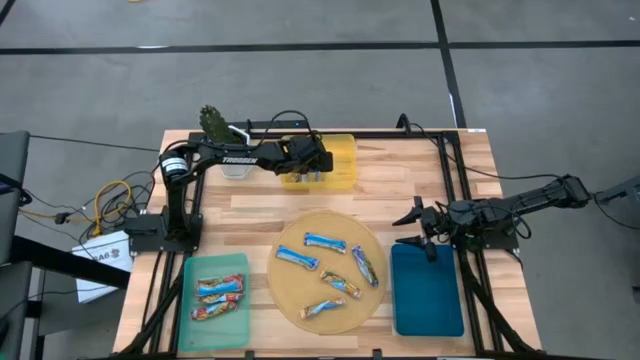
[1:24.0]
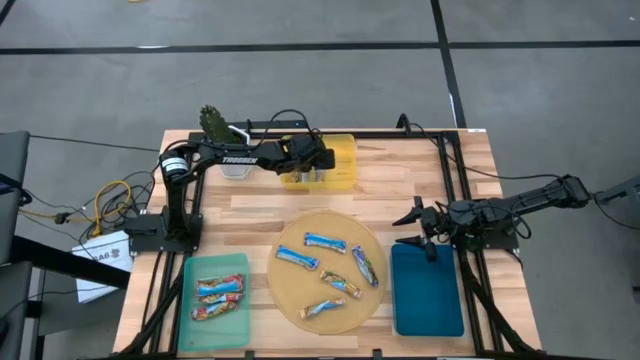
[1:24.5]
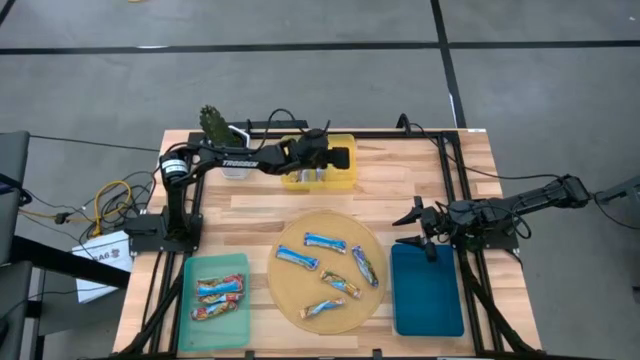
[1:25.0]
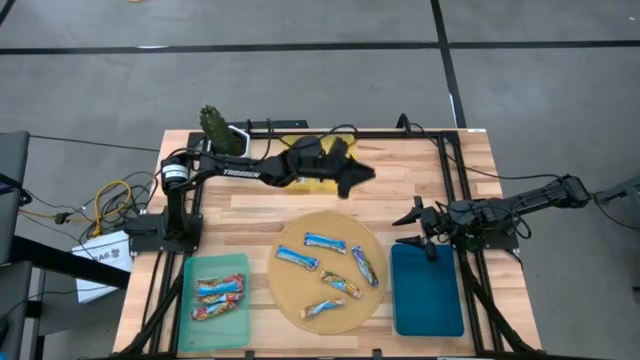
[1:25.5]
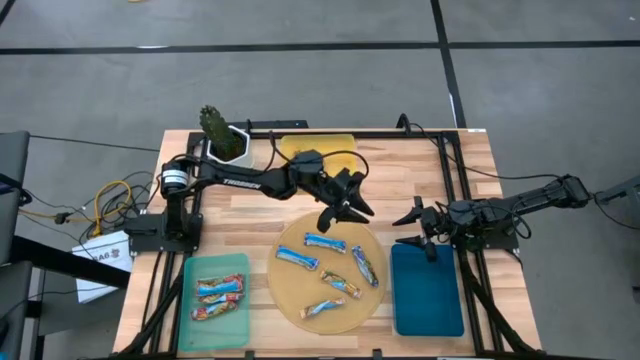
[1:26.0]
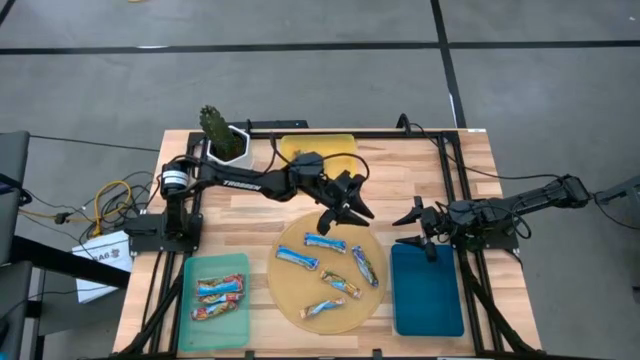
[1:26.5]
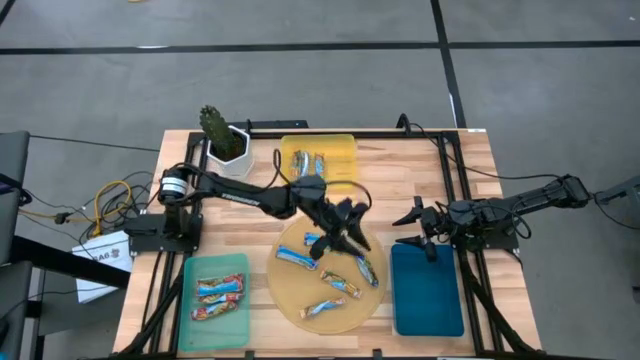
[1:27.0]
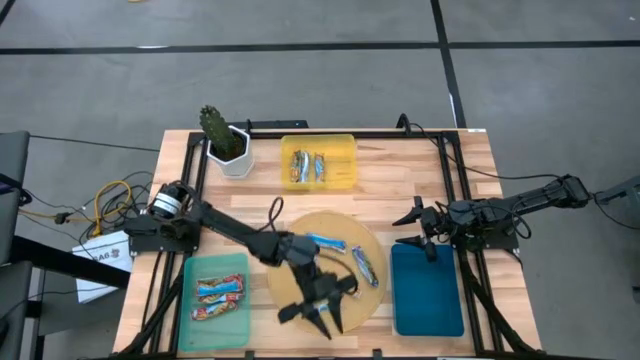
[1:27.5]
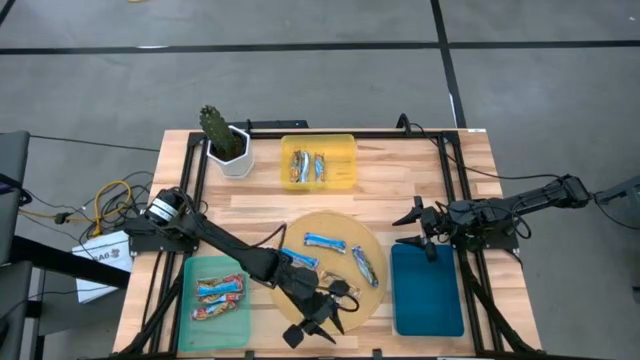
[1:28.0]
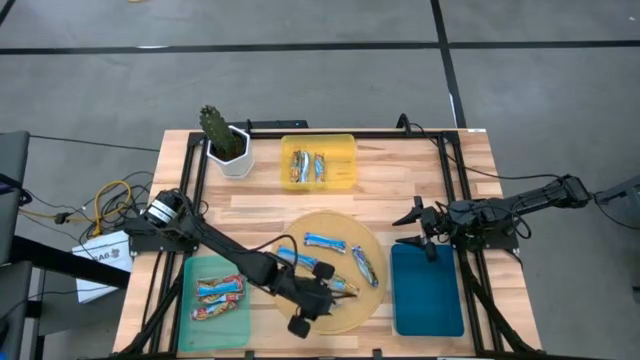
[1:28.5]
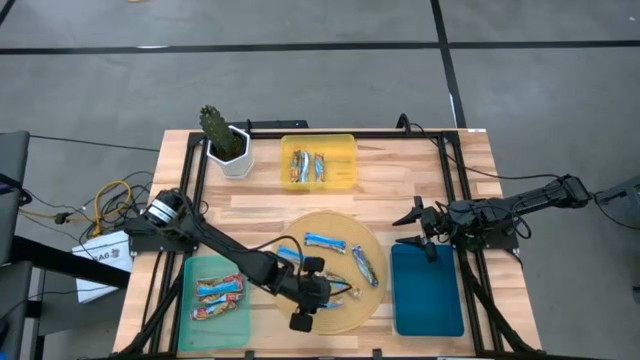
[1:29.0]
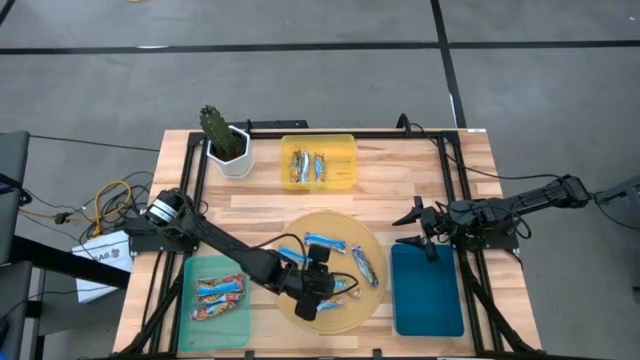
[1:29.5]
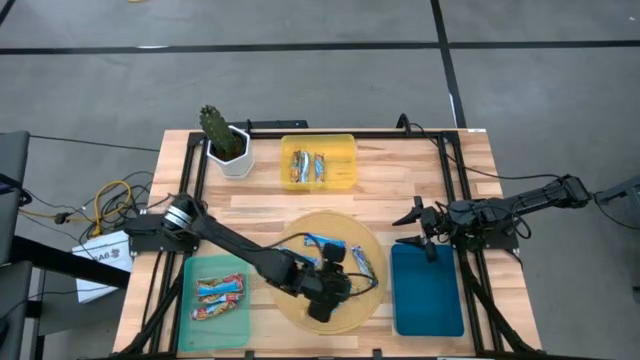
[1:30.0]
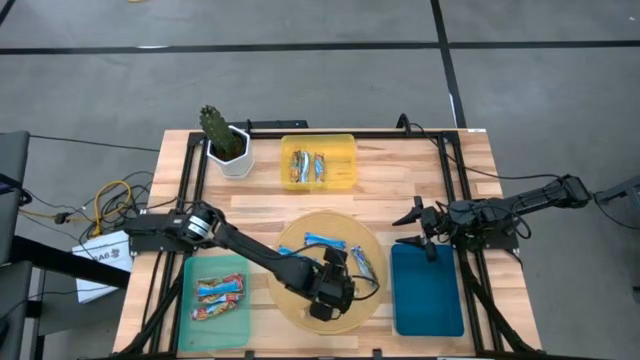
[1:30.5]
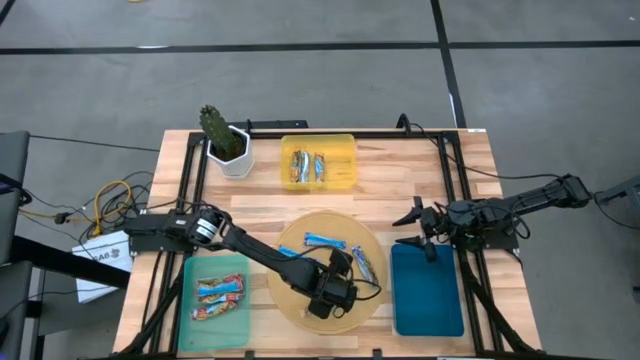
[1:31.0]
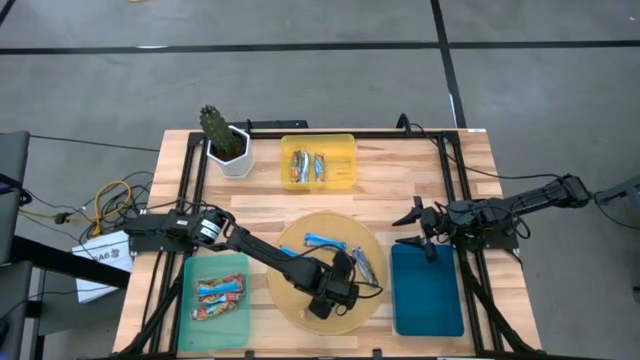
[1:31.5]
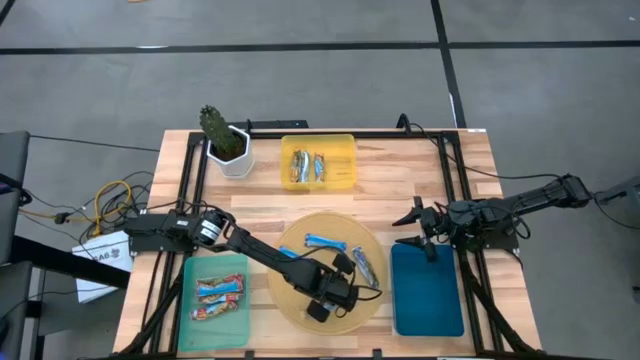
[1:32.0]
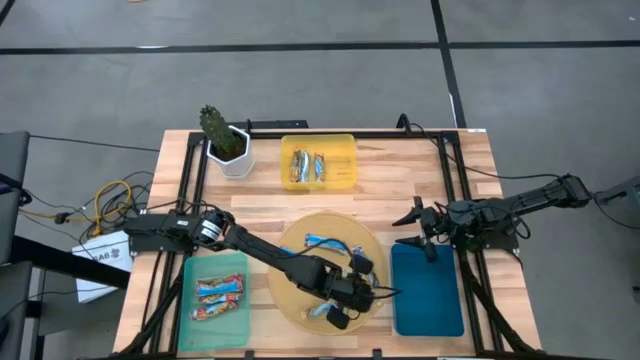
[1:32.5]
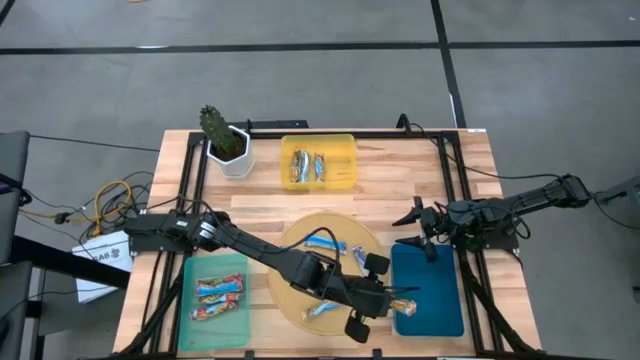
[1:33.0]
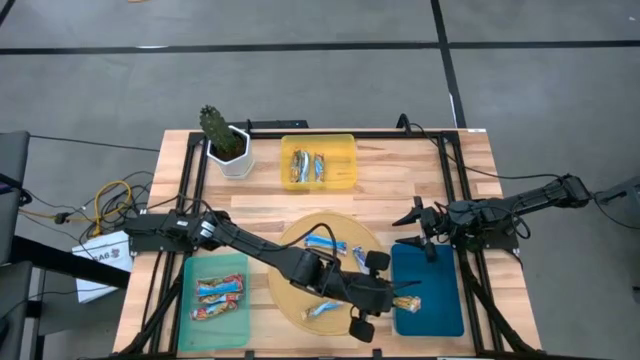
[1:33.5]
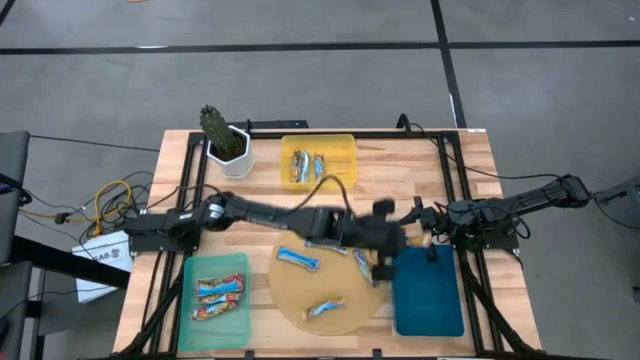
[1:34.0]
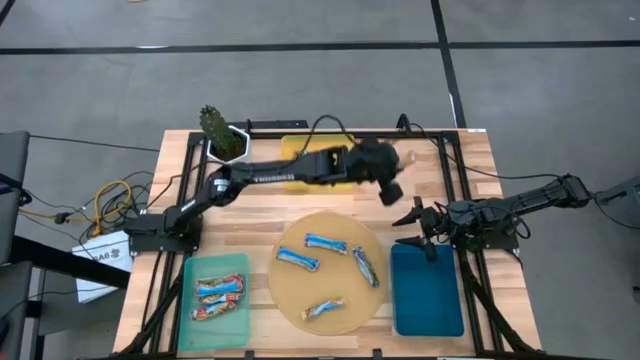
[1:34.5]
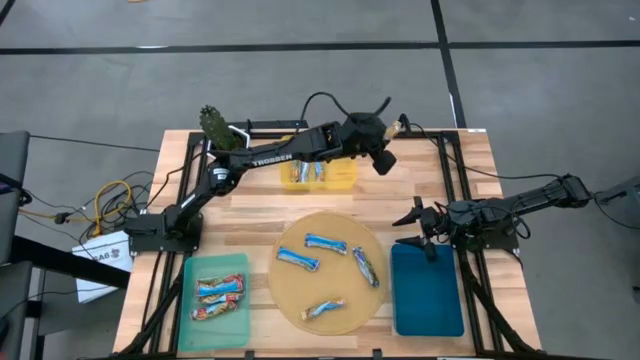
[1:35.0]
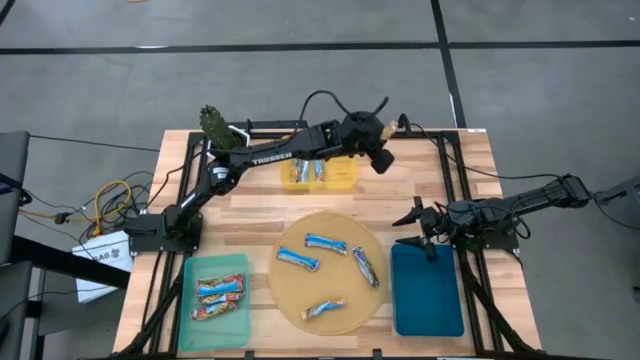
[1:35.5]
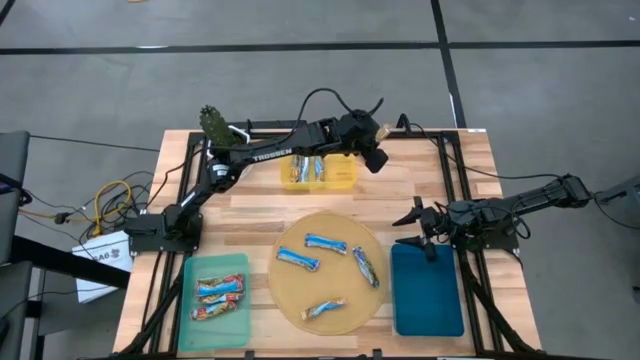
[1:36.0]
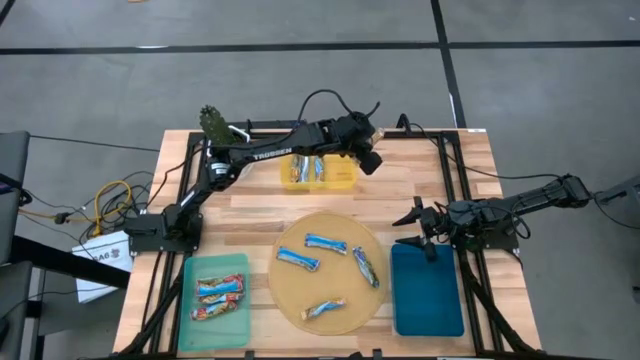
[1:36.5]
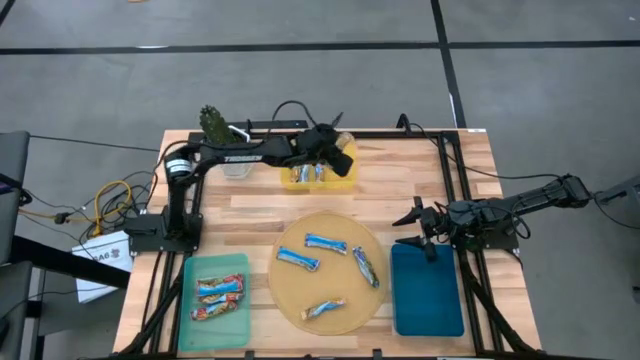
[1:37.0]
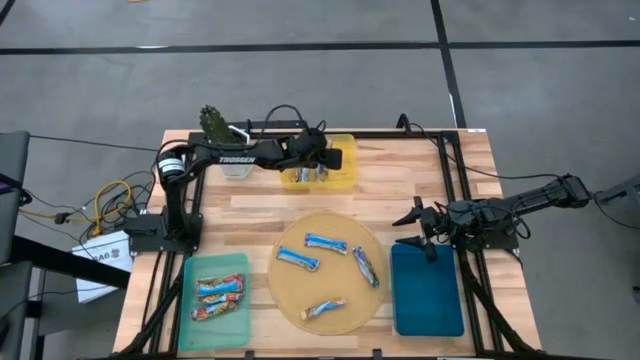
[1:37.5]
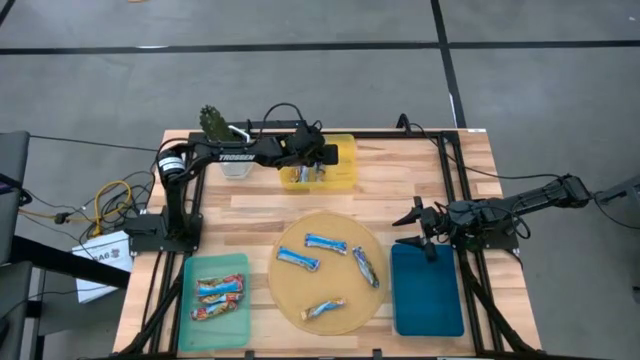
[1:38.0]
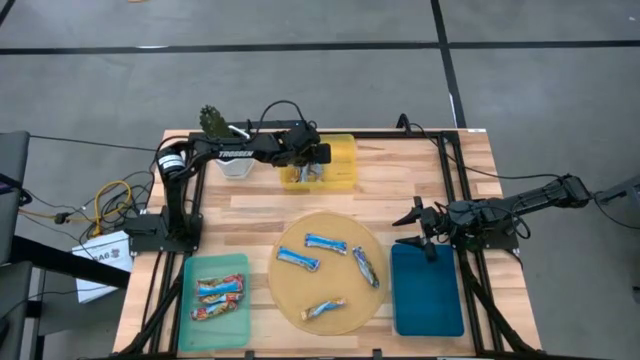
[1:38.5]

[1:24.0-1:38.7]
Task: Pick and place Granola Bars by type
Put the yellow granola bar into the yellow bin

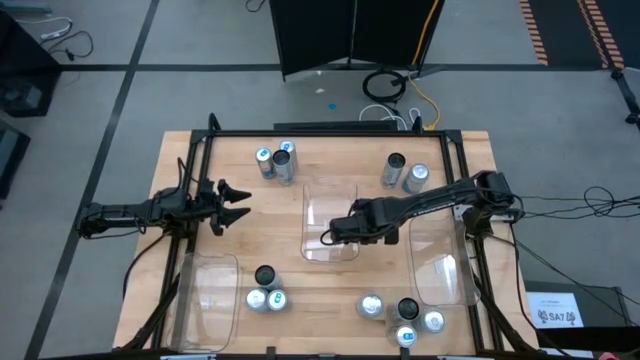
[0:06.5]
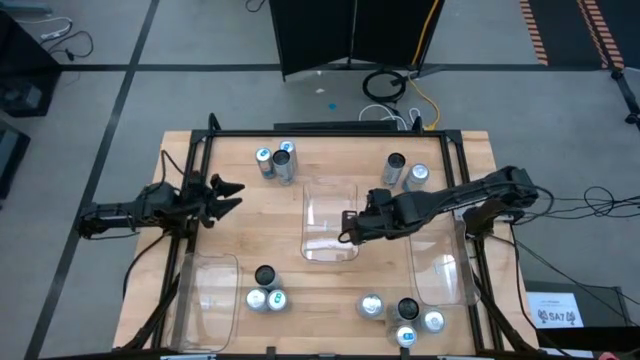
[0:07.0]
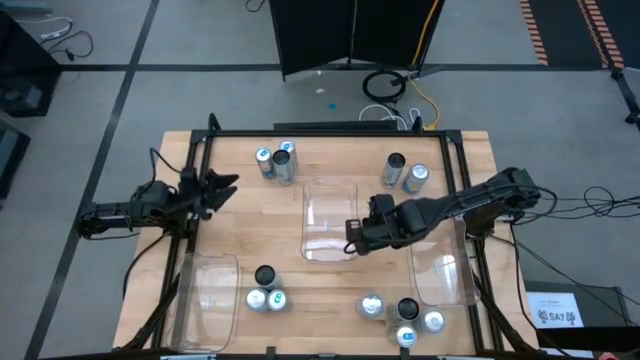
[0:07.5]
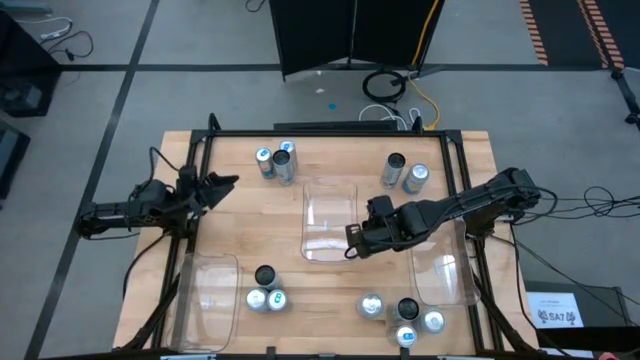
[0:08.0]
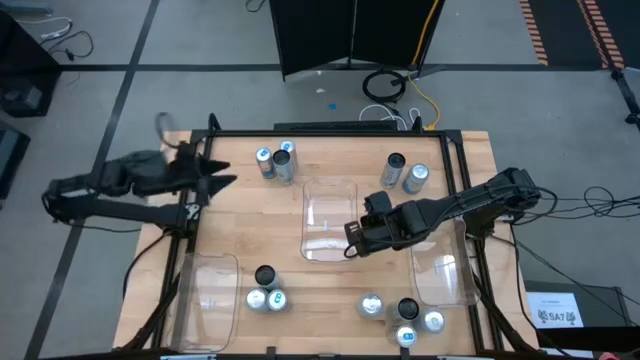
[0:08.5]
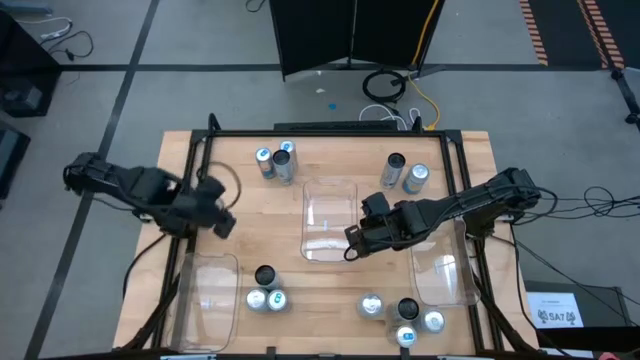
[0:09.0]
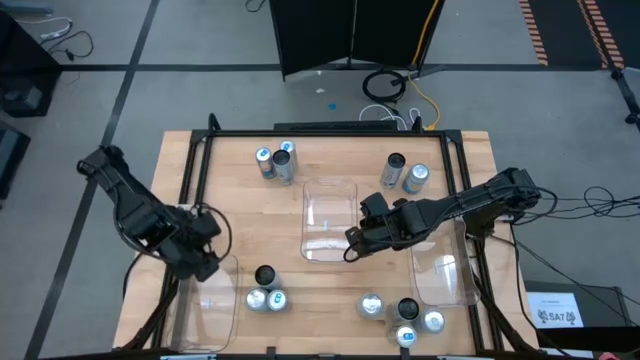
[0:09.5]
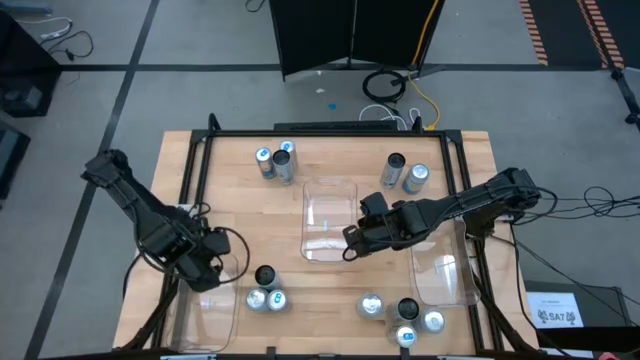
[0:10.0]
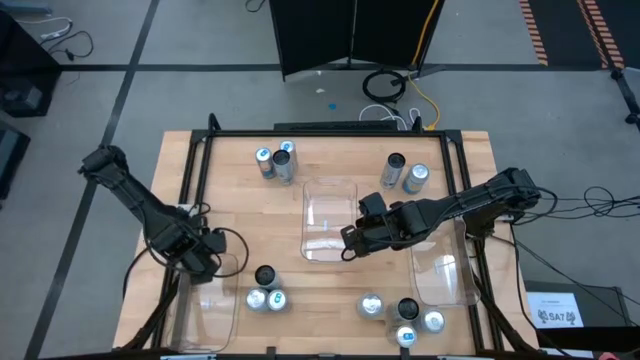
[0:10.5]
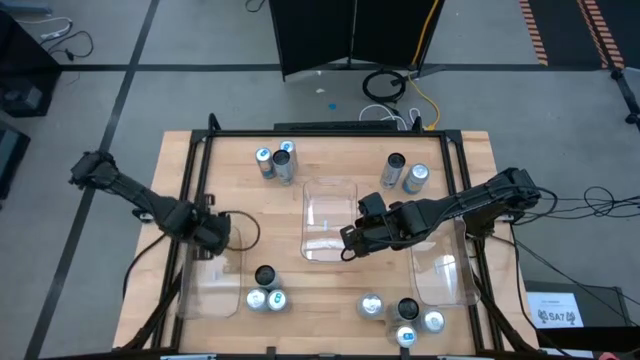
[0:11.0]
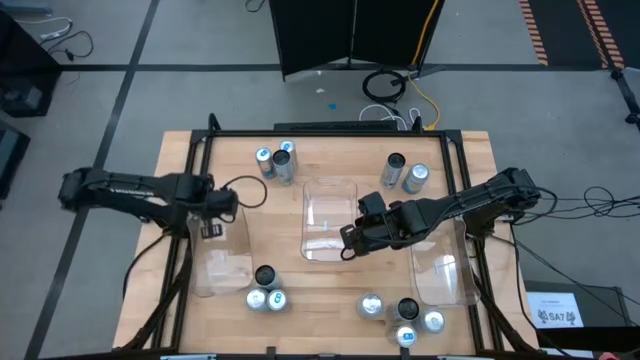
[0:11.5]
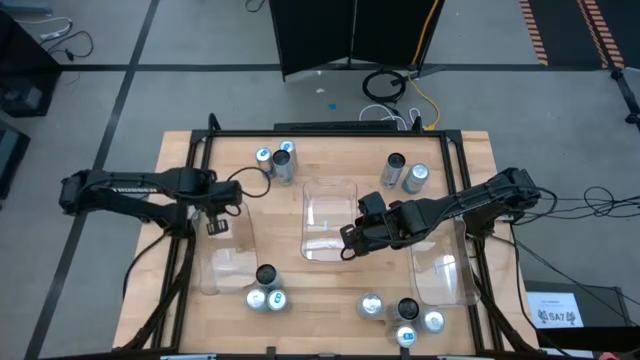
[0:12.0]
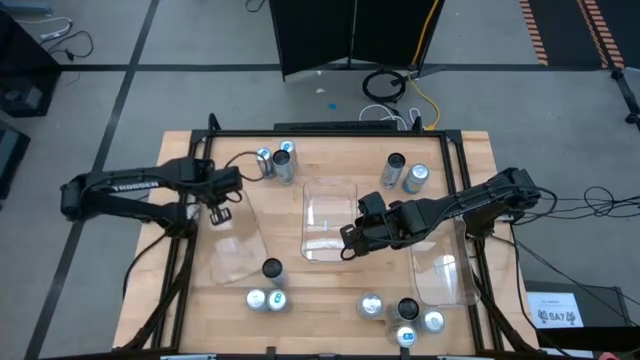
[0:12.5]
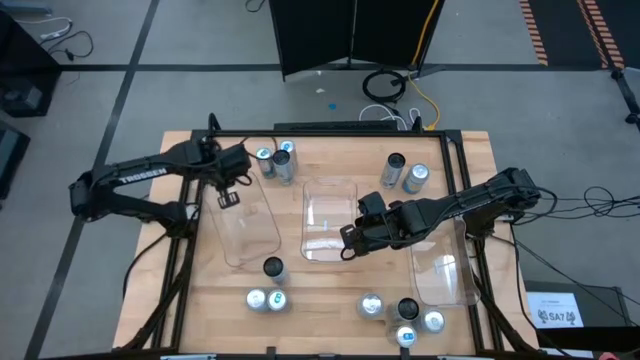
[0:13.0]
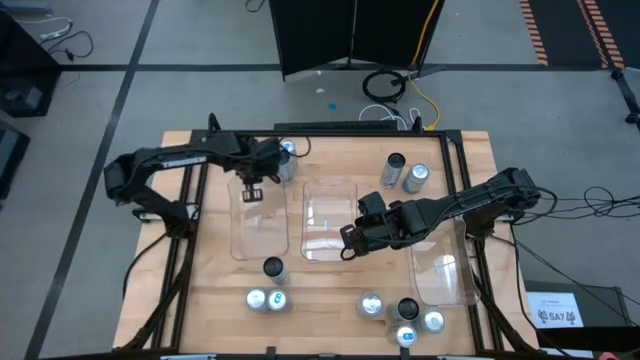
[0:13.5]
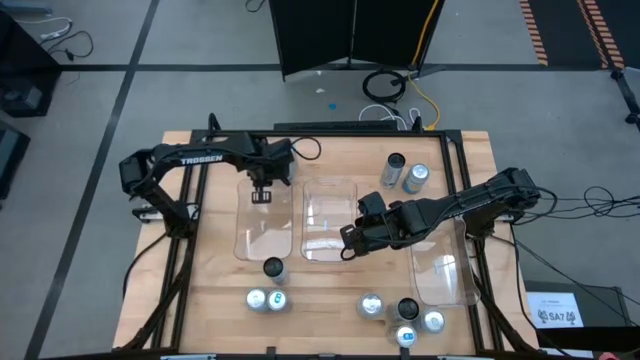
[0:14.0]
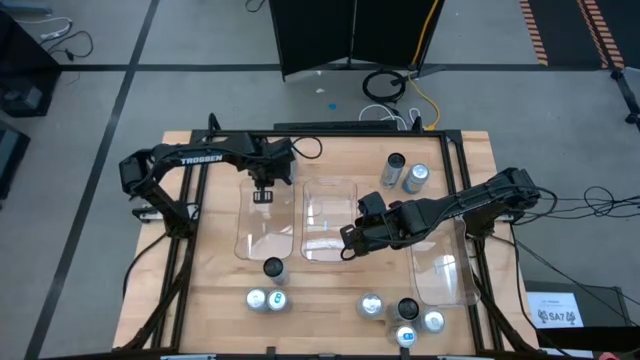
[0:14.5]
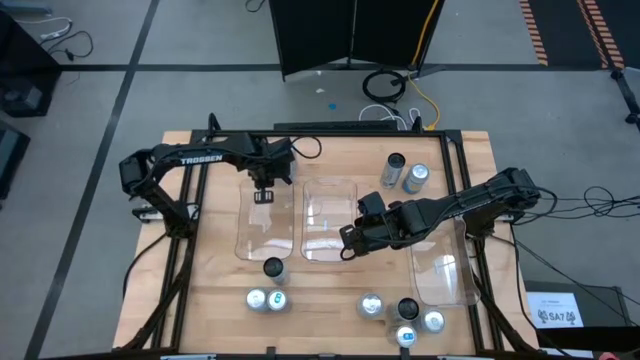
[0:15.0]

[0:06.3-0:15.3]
Task: Sort soda cans
Move the bottom transparent bin to the middle left of the table
